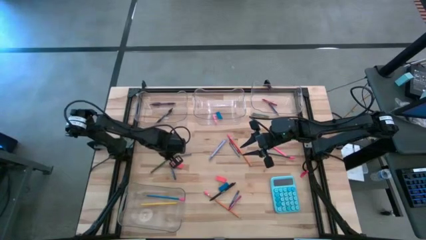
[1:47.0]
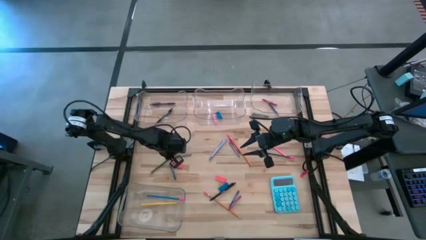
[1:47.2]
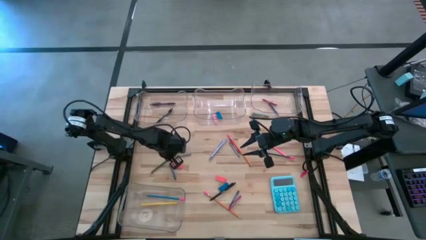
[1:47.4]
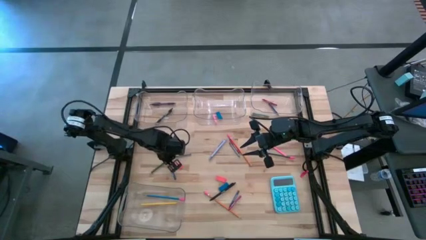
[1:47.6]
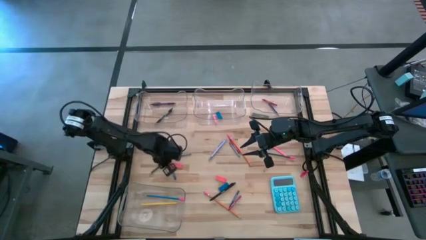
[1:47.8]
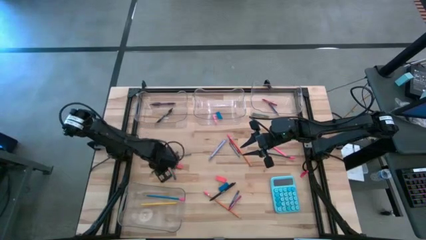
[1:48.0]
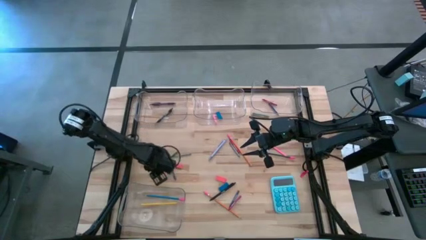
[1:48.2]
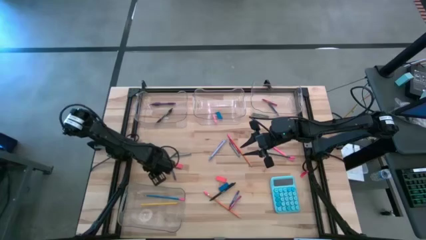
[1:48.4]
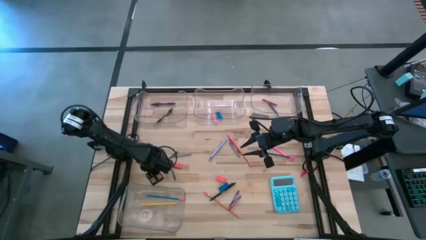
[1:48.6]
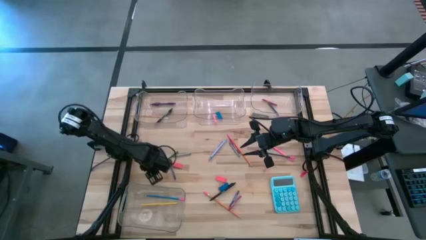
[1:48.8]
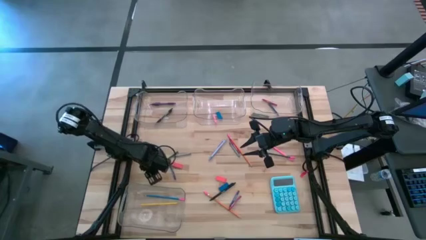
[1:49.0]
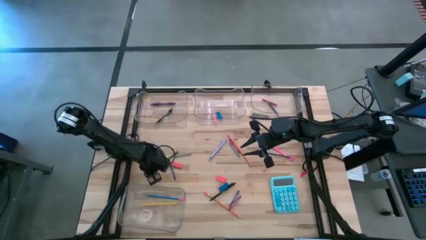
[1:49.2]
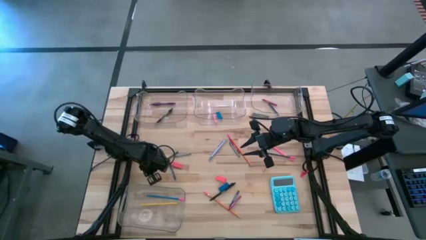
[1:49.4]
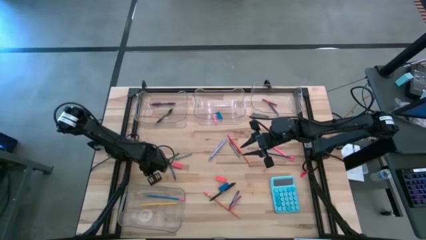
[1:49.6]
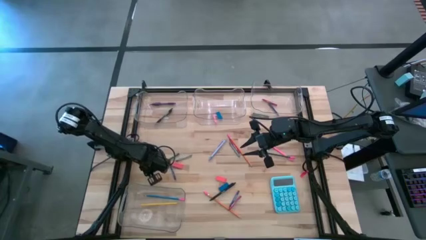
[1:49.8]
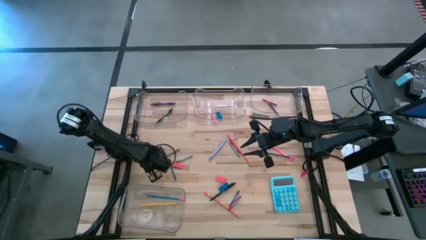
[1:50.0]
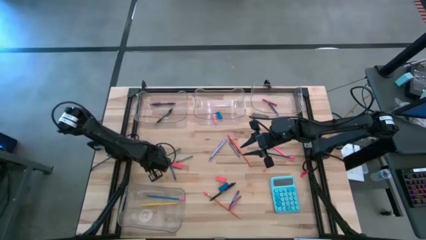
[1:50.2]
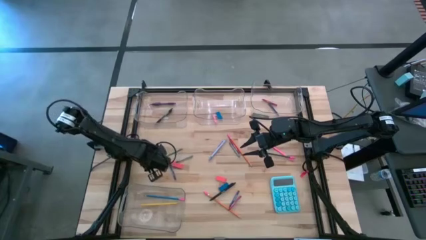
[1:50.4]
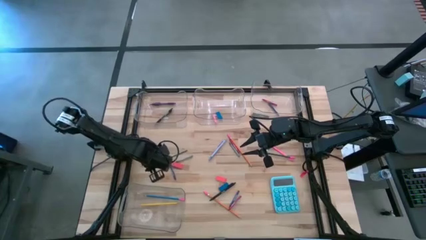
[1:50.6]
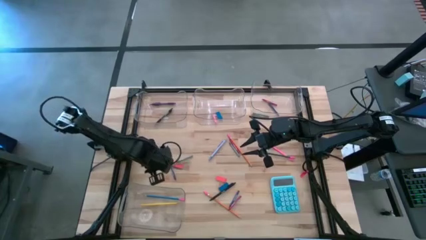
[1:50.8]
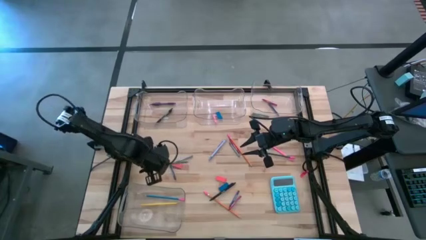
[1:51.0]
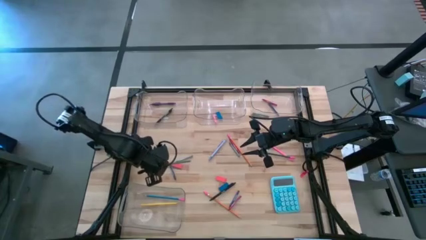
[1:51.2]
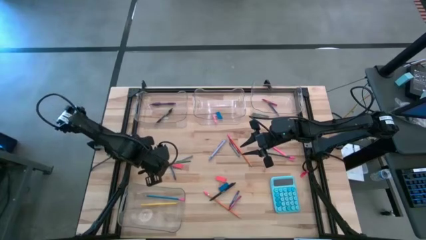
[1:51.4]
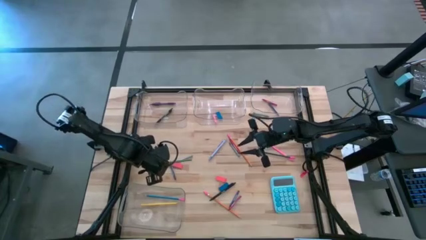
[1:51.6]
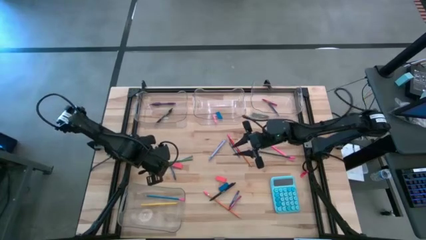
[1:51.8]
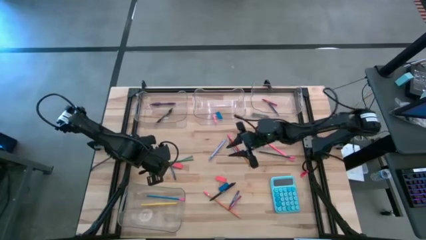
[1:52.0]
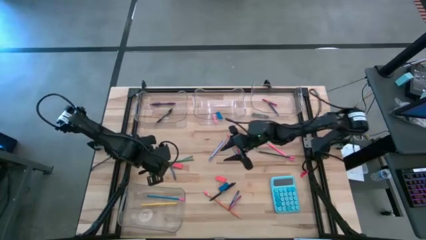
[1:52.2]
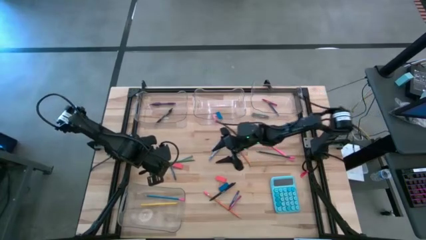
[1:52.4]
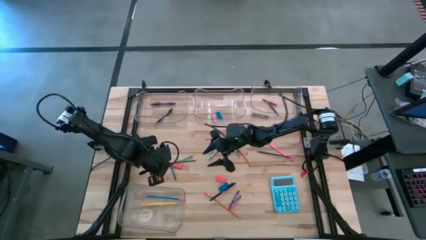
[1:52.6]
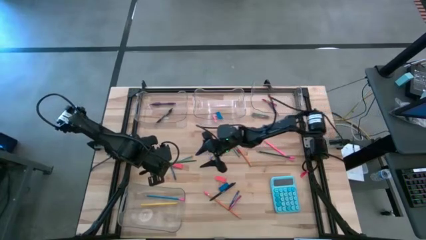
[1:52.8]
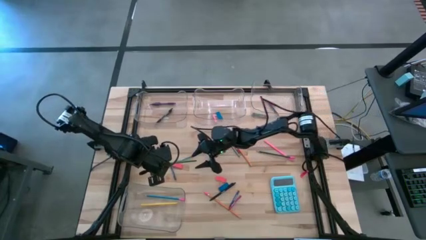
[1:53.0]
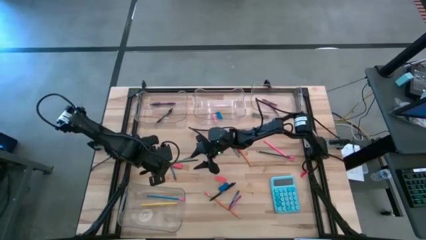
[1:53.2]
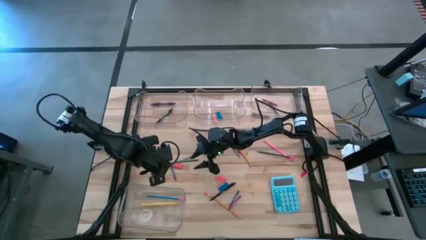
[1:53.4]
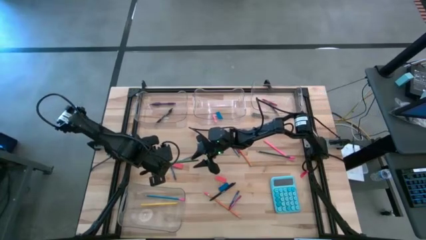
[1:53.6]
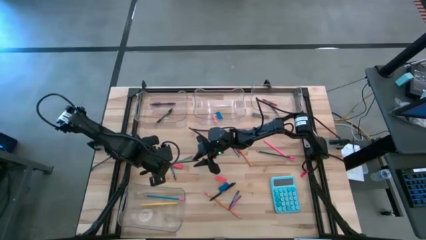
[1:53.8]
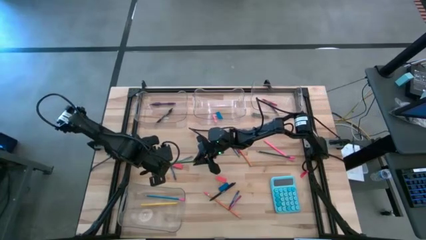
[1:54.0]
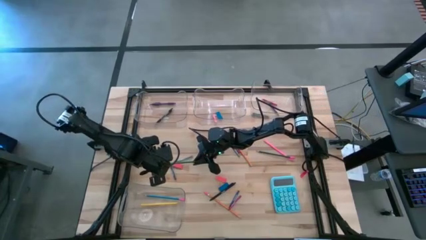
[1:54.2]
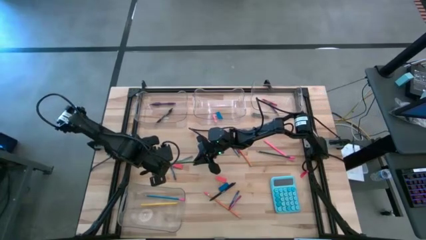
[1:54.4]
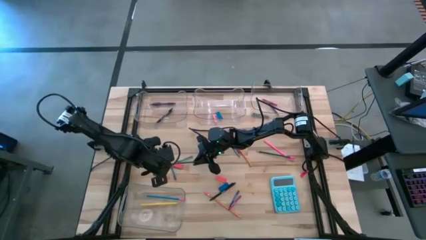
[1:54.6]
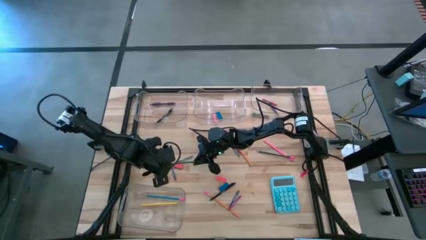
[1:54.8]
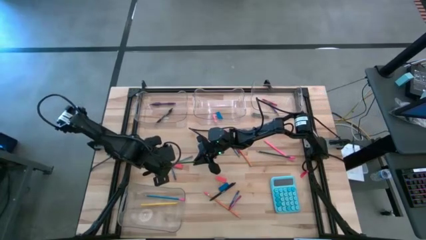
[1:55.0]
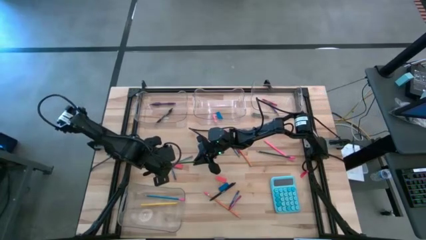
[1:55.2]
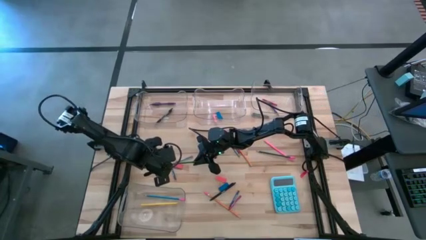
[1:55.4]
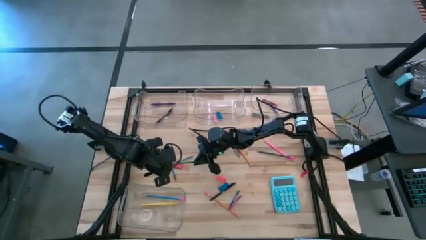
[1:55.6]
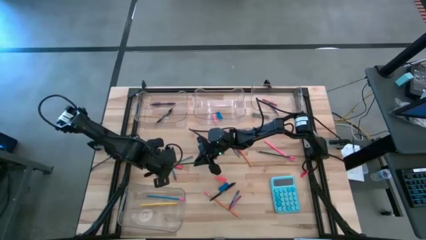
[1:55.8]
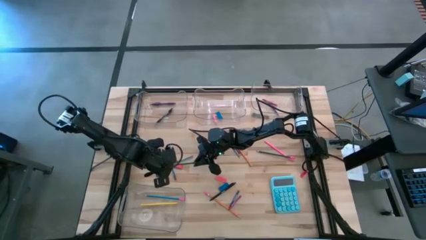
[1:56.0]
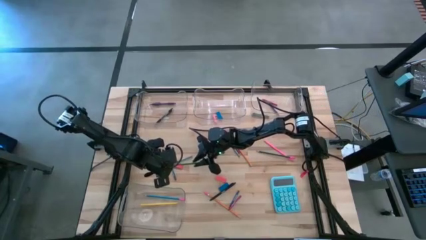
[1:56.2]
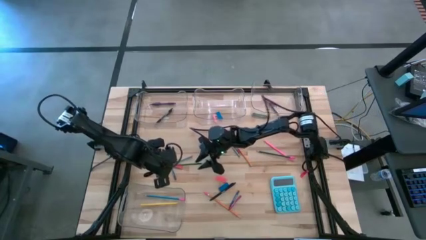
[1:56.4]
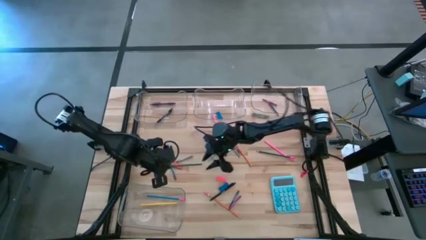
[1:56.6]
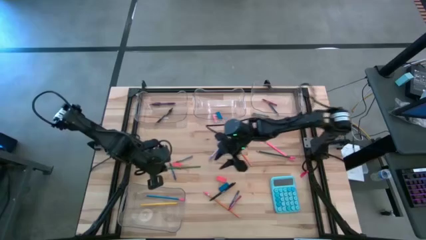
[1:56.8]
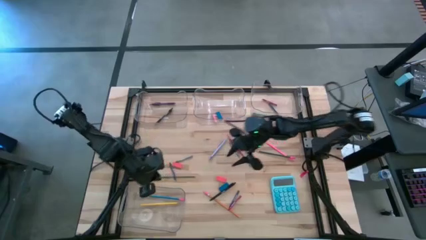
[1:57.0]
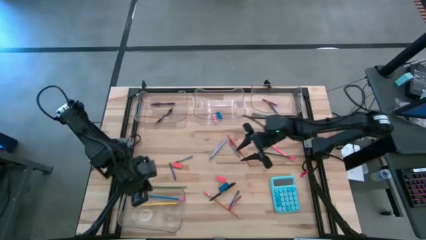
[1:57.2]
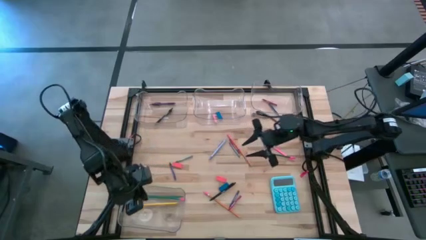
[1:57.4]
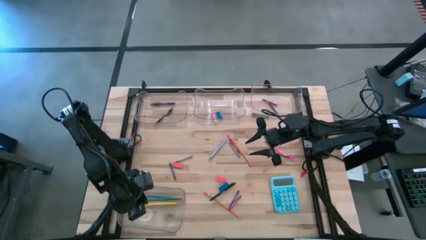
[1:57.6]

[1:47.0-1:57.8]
Task: Sort crayons/erasers/pens/pencils in bins
Put the green pencil into the bottom transparent bin

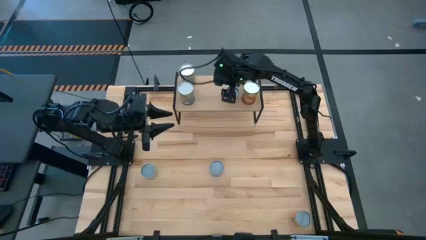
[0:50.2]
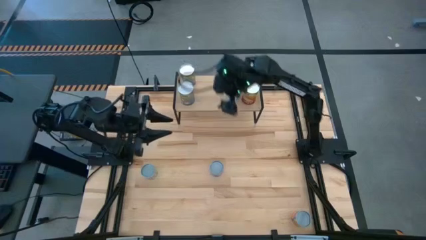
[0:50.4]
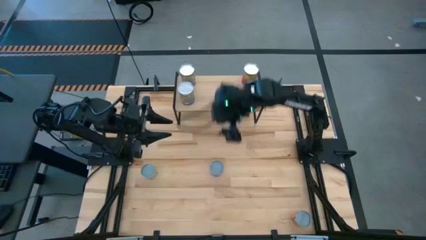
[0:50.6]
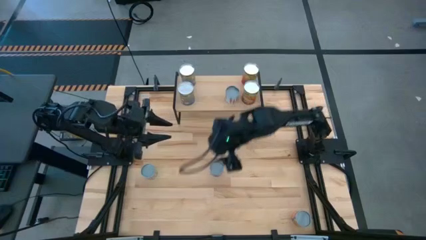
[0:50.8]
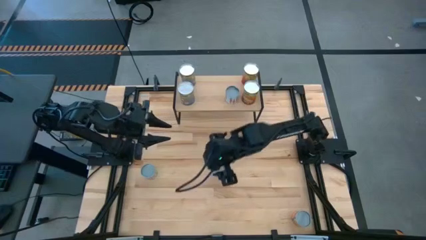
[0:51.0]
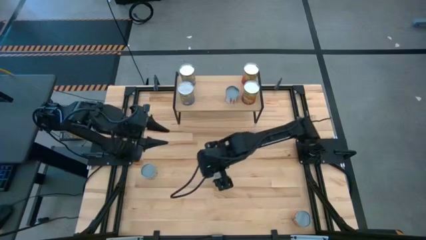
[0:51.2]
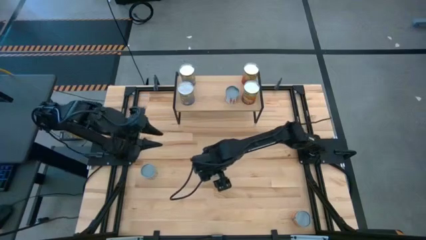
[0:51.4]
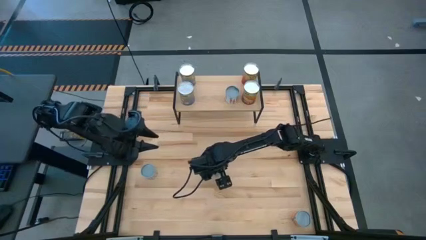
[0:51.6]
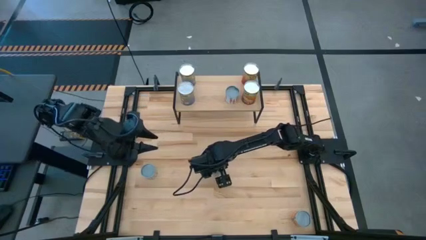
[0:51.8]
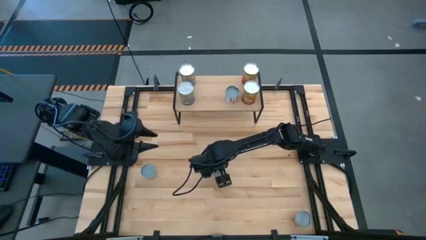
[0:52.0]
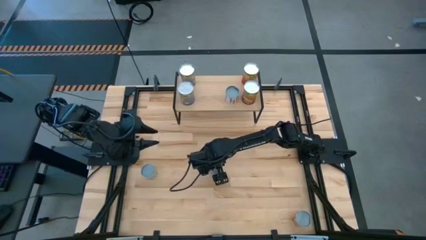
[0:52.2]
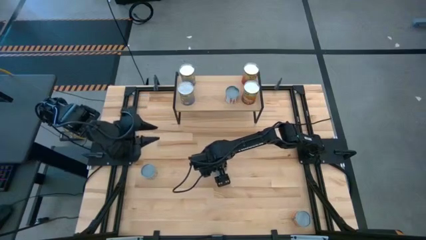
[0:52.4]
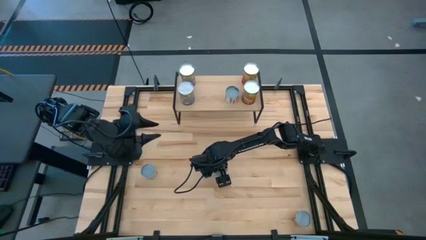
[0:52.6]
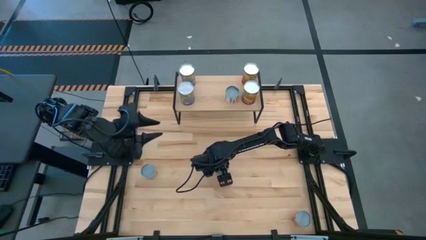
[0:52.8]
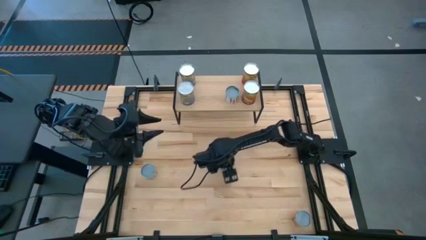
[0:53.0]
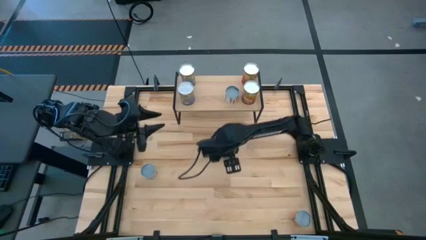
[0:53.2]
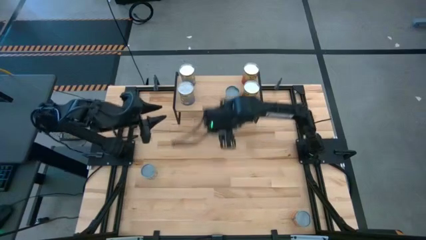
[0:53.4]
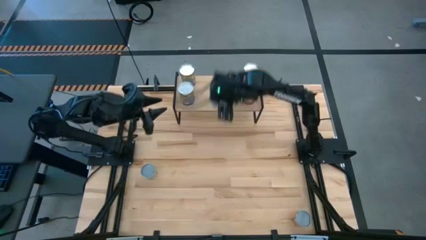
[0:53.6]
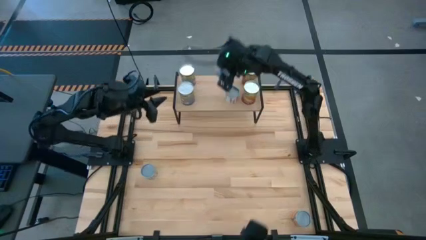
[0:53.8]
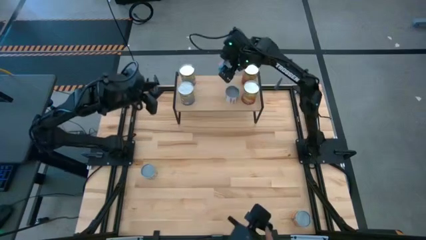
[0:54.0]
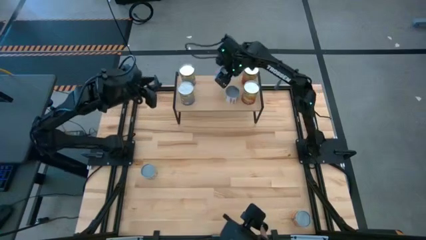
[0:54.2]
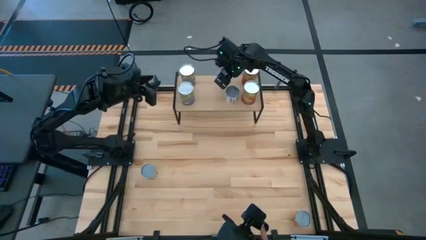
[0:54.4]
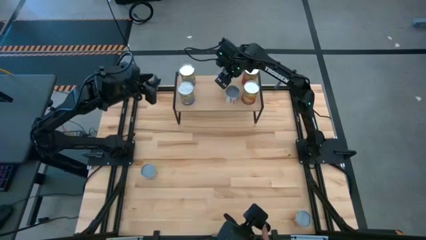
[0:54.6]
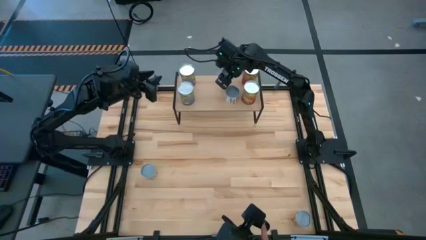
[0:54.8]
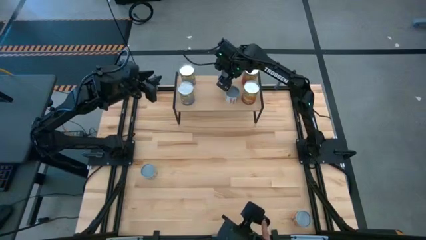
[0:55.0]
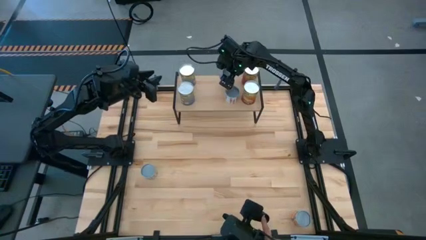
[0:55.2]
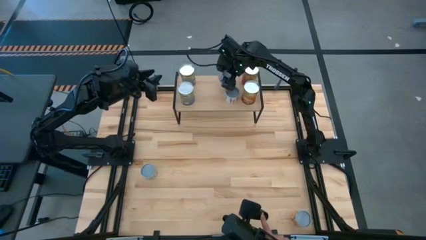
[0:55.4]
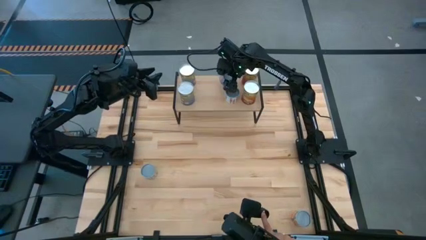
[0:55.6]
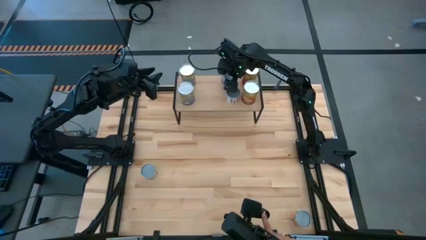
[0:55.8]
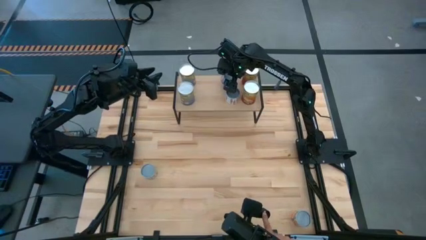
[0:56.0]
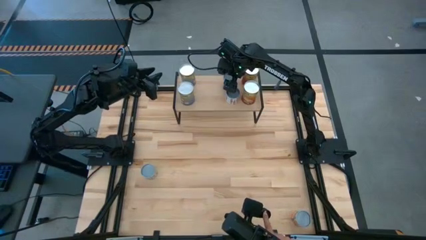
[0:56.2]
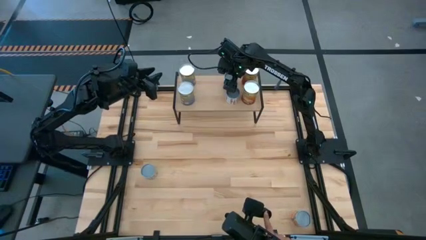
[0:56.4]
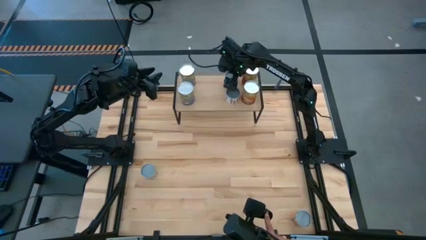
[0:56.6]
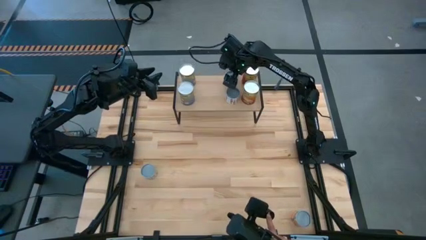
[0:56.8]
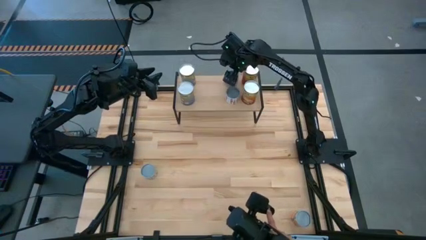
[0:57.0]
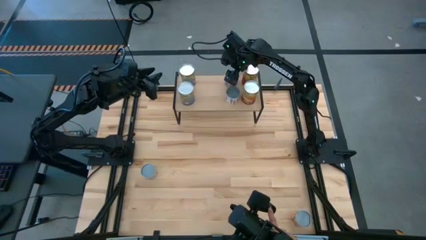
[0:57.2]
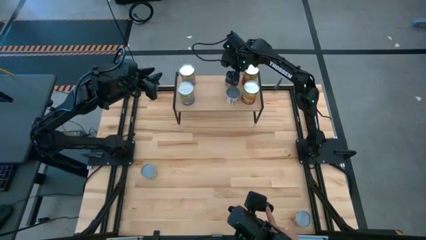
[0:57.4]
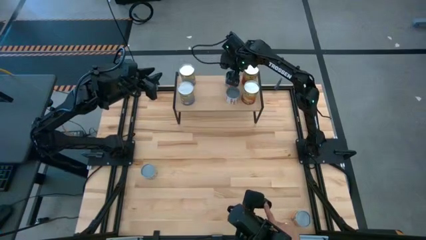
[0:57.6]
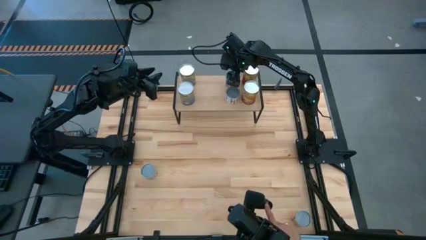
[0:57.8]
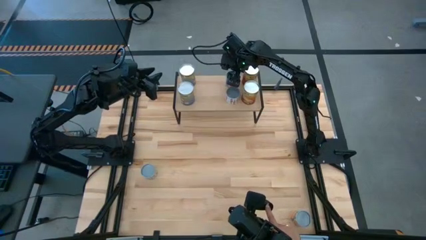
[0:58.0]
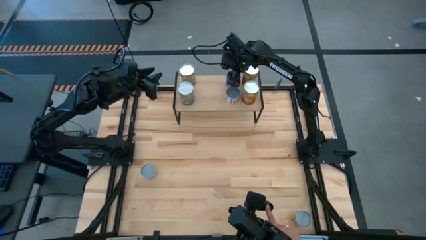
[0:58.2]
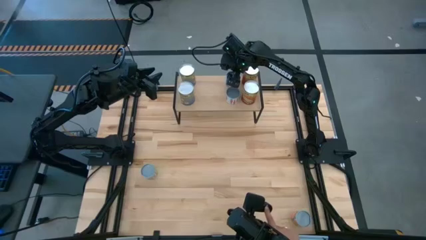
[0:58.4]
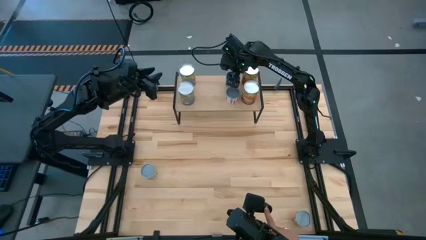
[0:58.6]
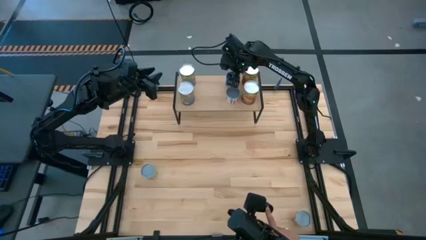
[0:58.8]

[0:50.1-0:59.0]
Task: Pick and place cans onto a shelf
Put the small canned corn on the shelf
